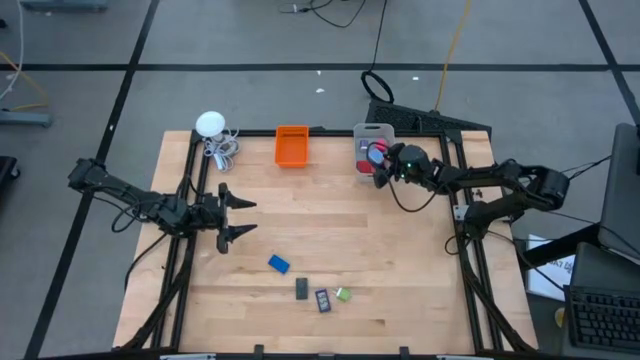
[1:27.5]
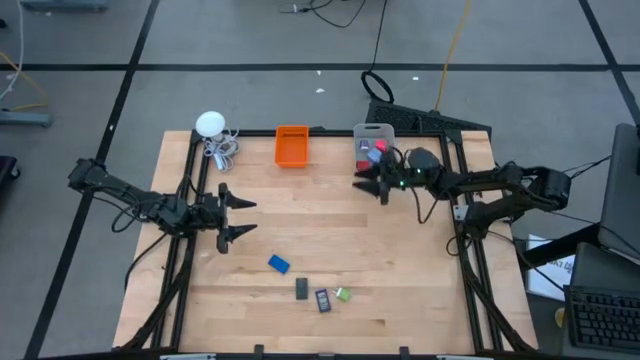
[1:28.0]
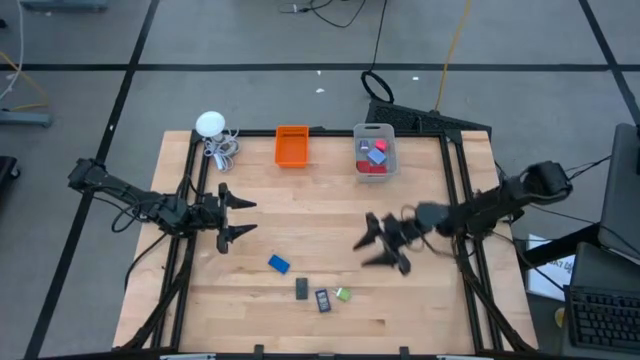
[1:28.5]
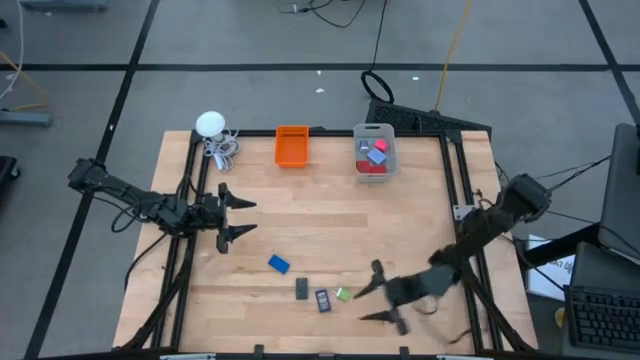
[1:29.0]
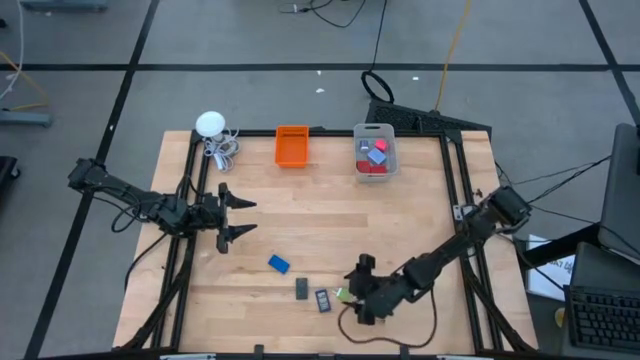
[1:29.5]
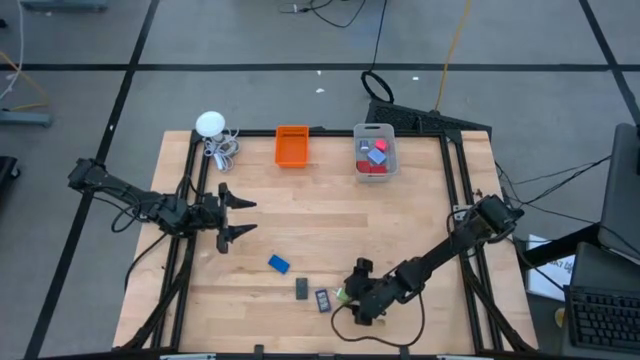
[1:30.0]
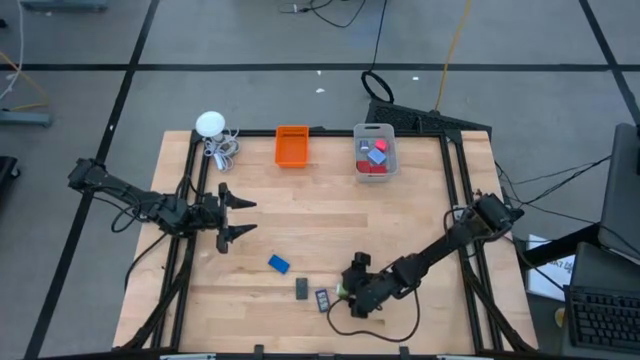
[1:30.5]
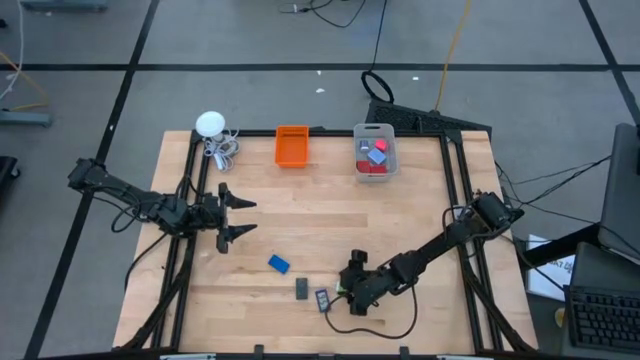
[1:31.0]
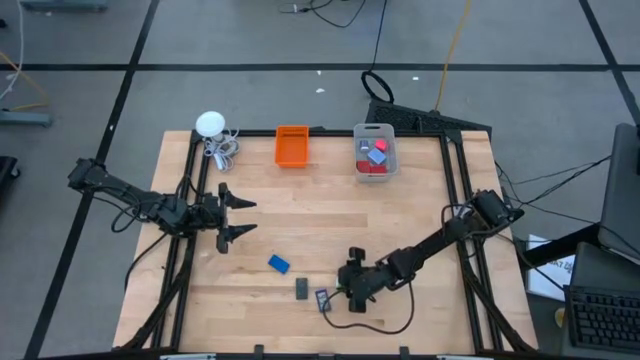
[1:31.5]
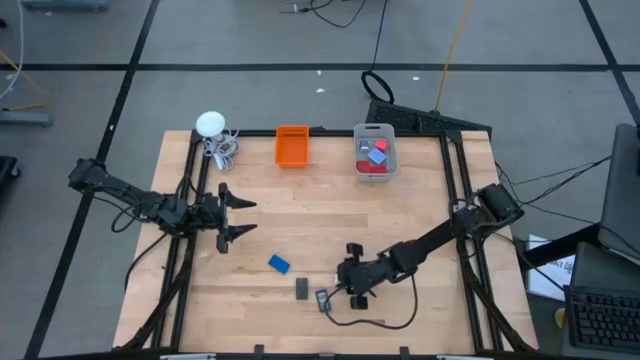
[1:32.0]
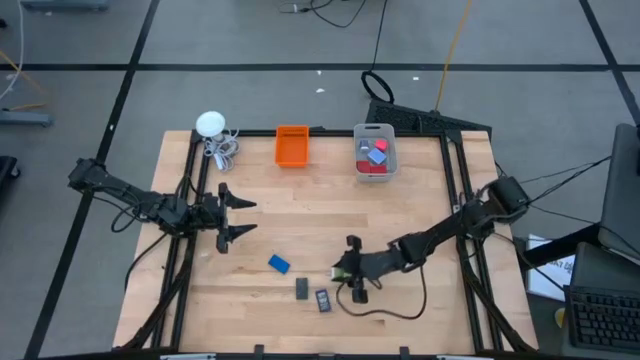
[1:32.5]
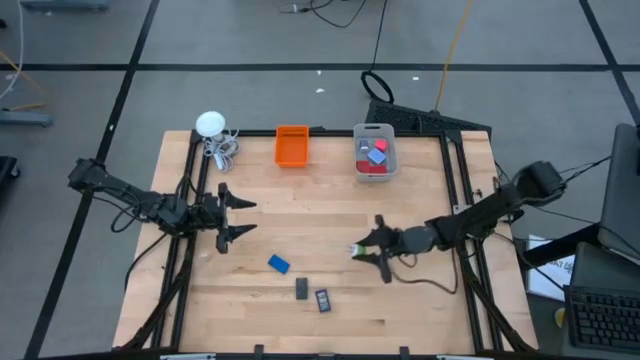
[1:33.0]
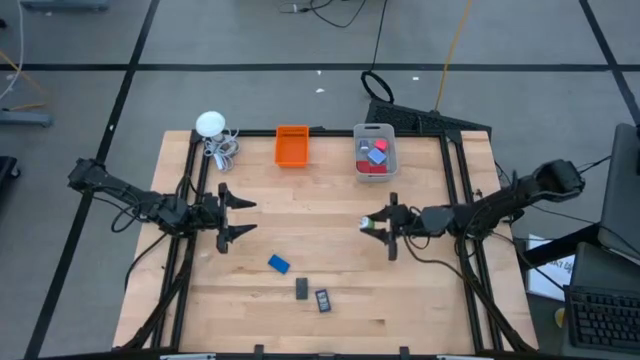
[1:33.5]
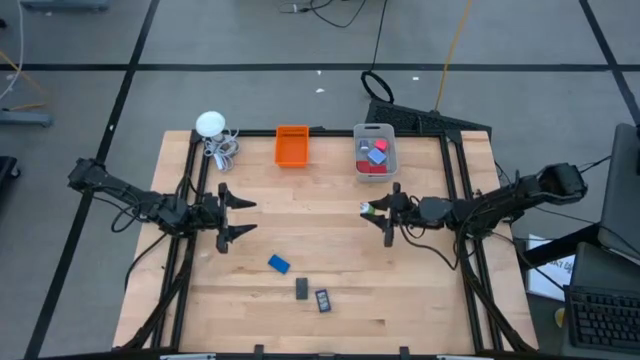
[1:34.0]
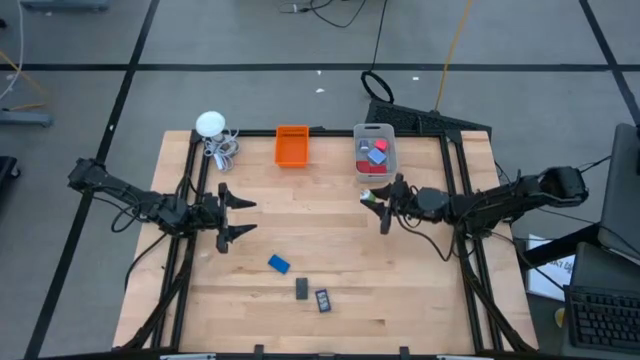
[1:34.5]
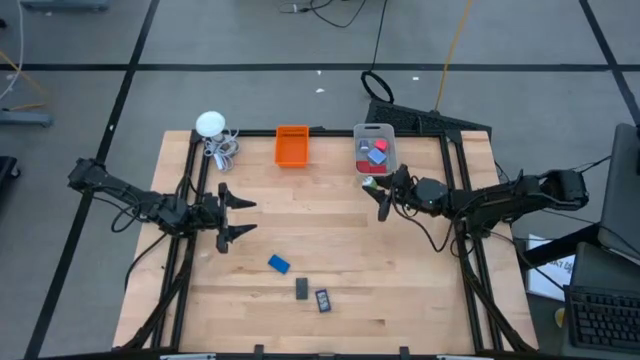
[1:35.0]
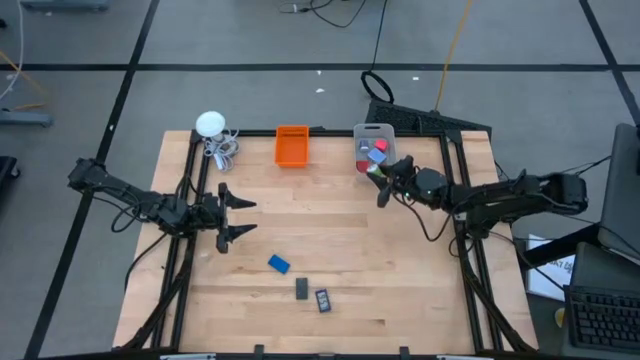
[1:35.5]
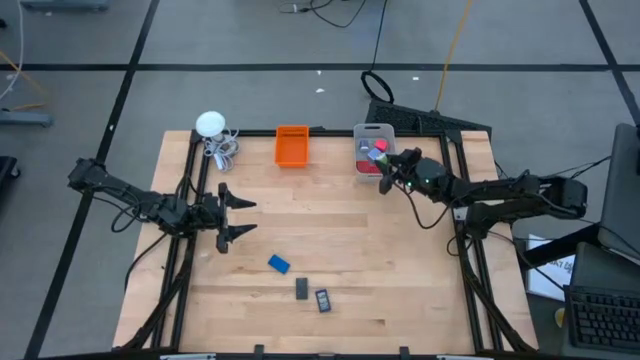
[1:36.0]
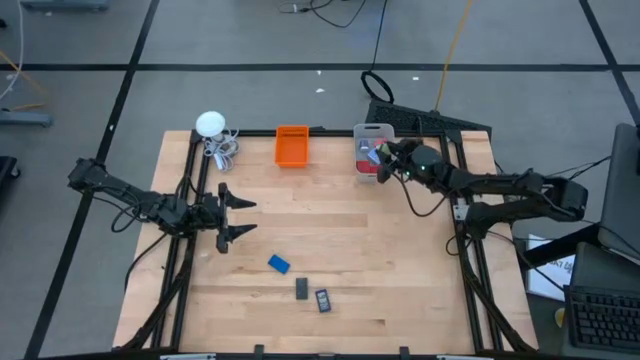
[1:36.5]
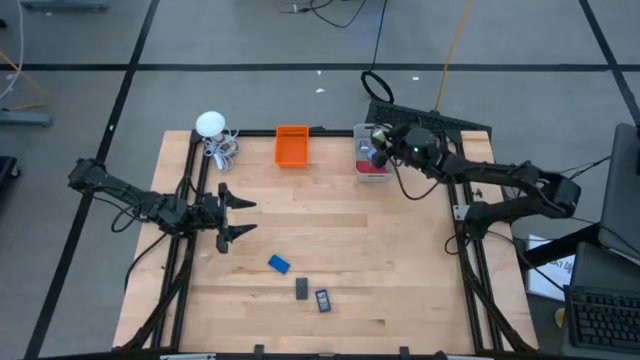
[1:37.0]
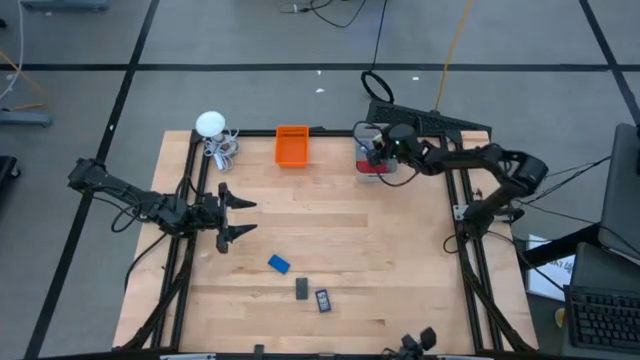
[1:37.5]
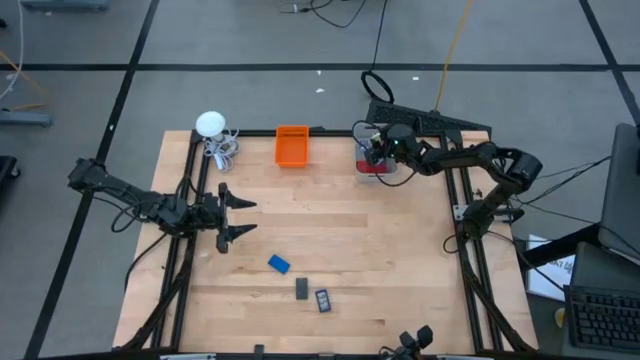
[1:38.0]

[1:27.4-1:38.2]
Task: Pick & Place Office items
Put the green charger adapter into the gray bin

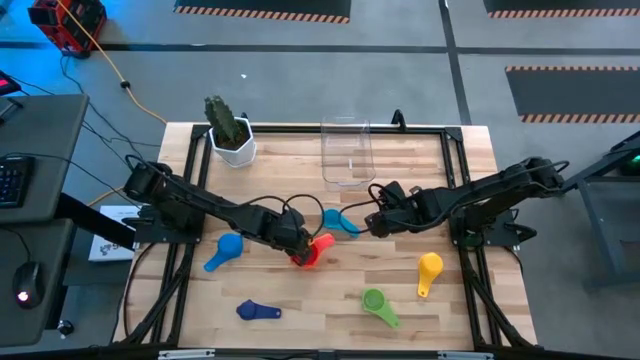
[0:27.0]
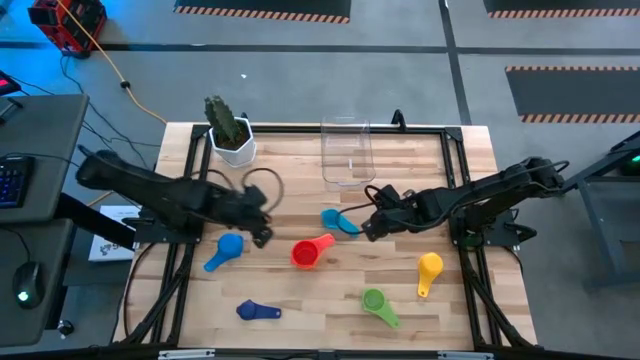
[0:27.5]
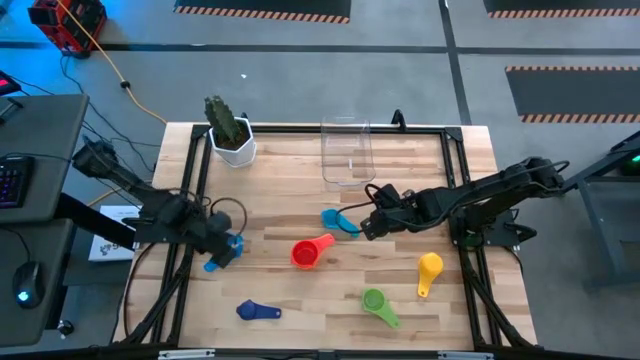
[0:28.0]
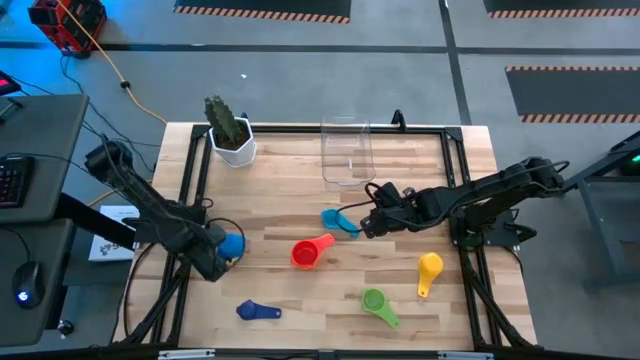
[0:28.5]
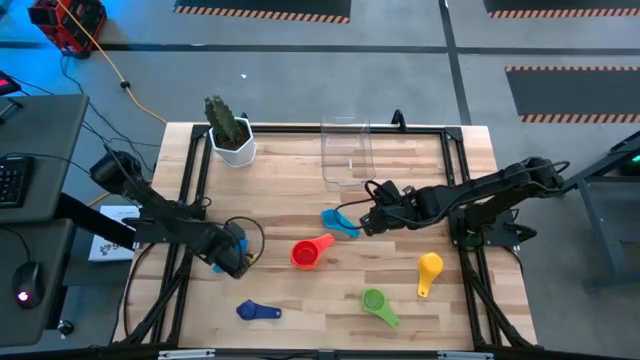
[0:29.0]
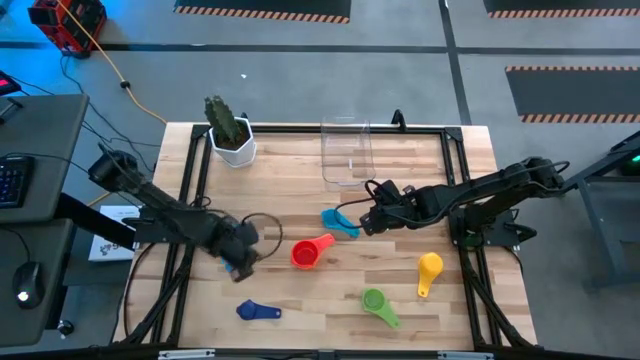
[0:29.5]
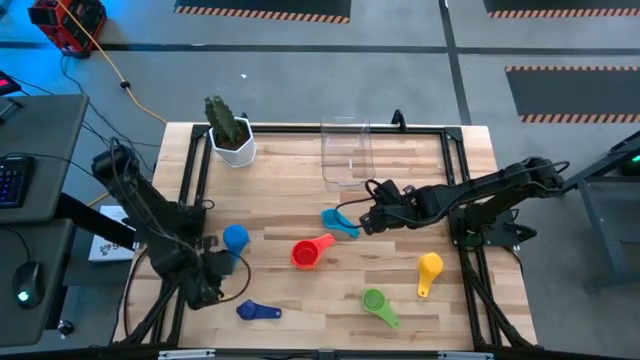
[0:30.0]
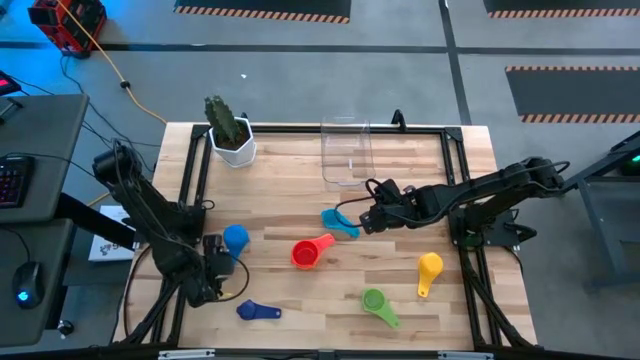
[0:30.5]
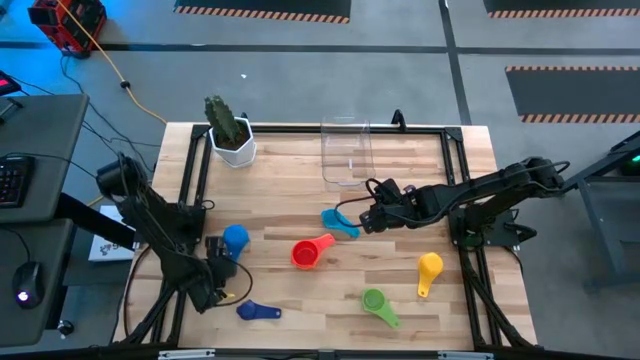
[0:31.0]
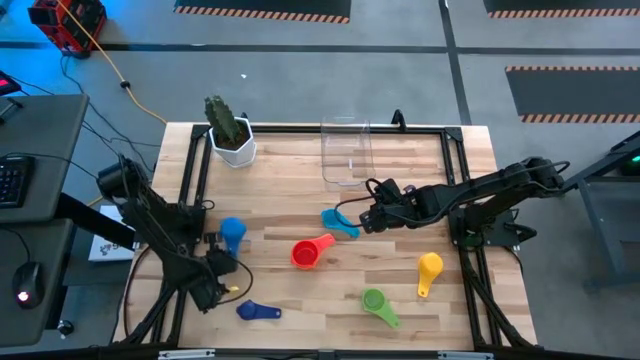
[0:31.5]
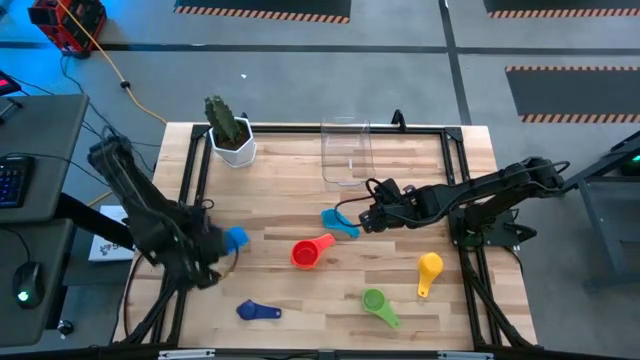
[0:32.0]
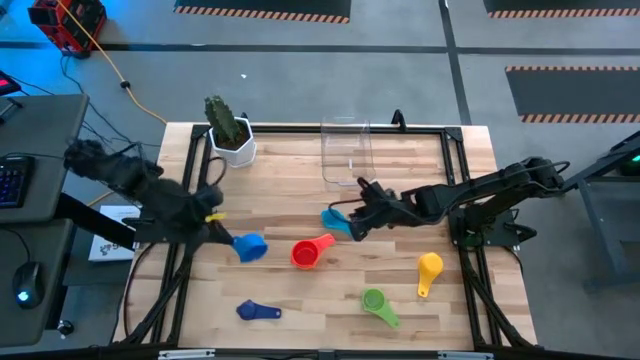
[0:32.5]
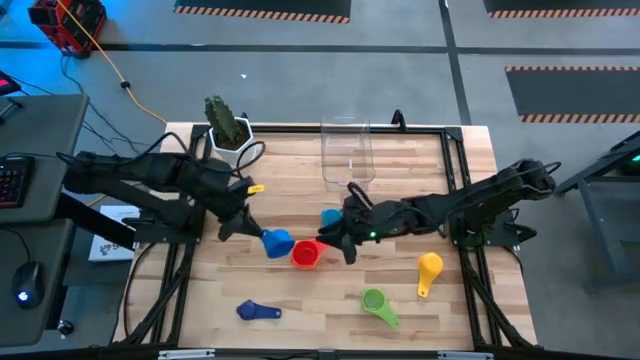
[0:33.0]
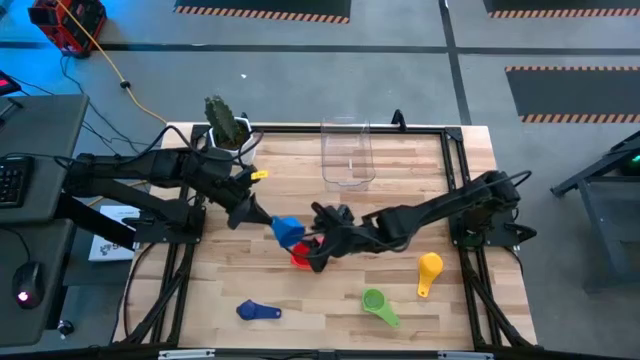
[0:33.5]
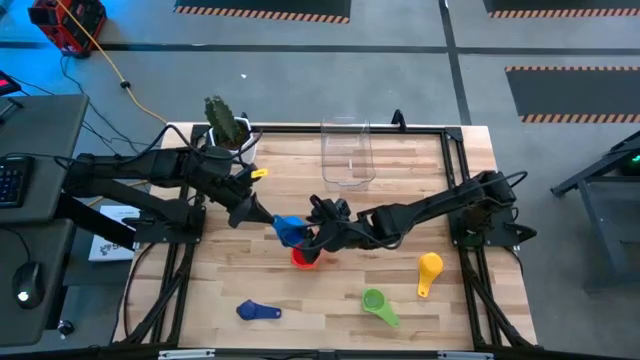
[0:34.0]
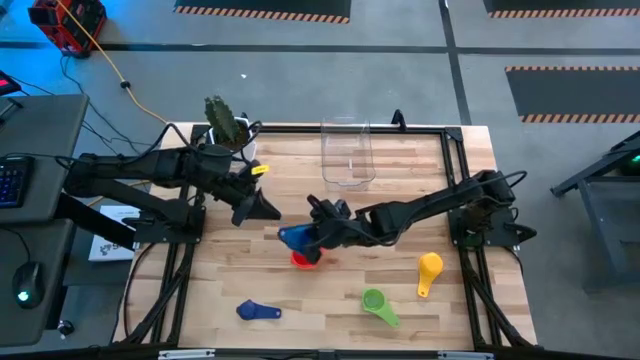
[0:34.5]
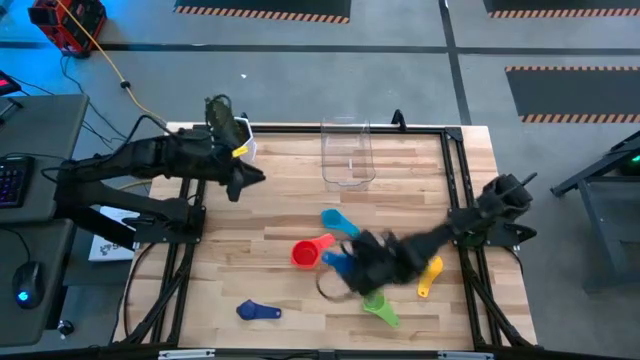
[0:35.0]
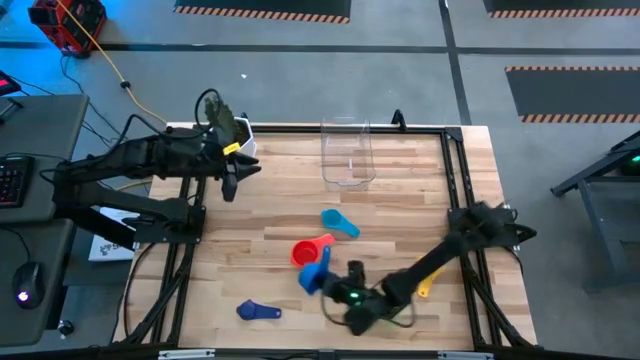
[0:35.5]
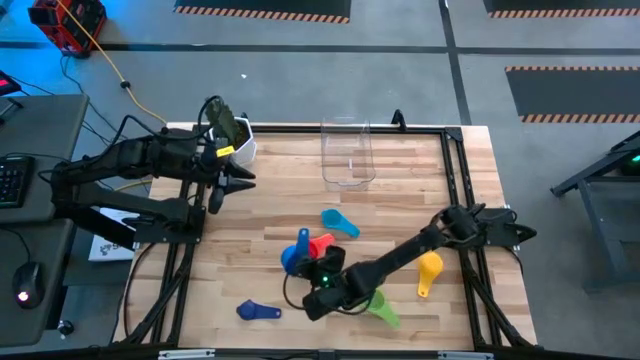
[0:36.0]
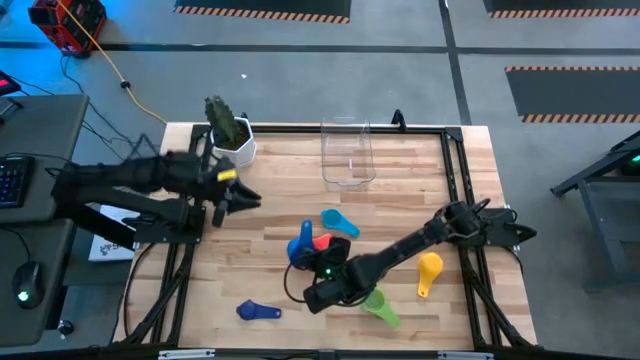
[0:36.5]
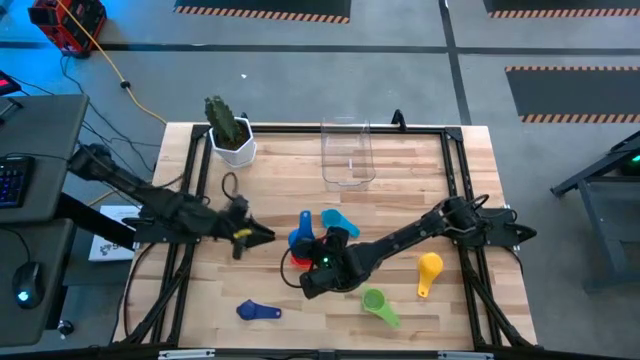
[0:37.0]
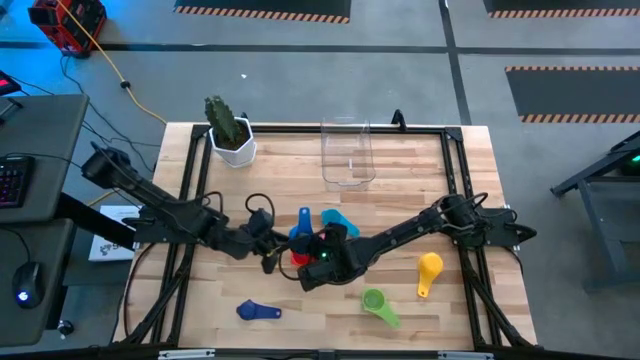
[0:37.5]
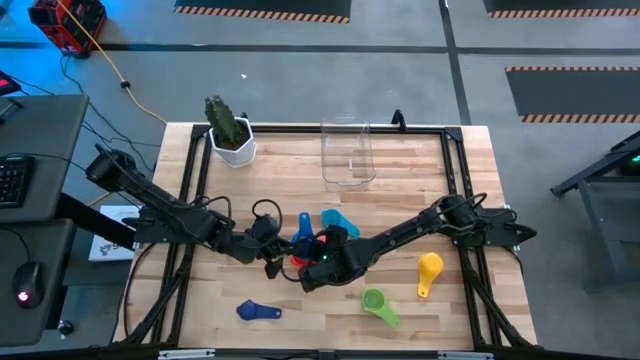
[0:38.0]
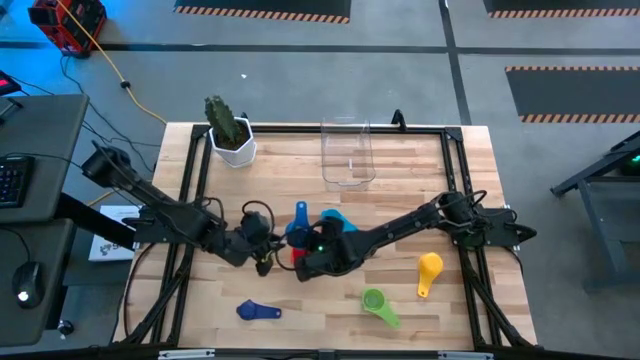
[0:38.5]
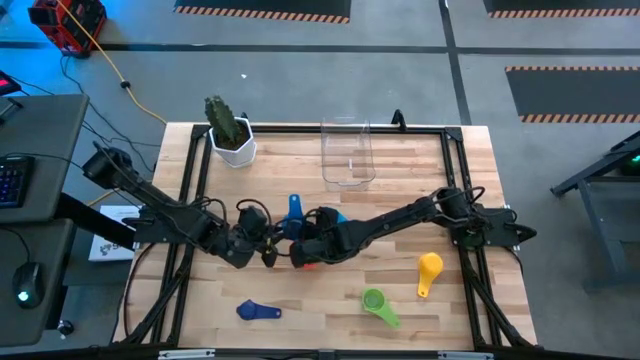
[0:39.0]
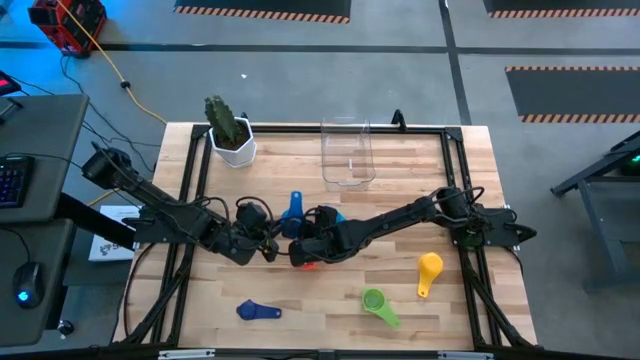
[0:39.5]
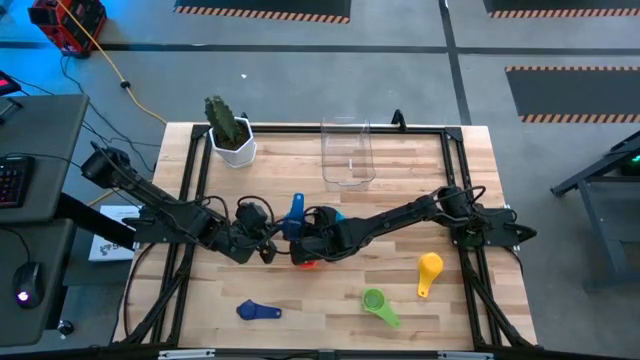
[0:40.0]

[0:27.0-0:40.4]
Task: Nest measuring cups in basket
Stack the blue measuring cup on top of the red measuring cup
